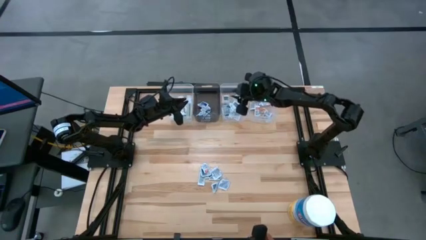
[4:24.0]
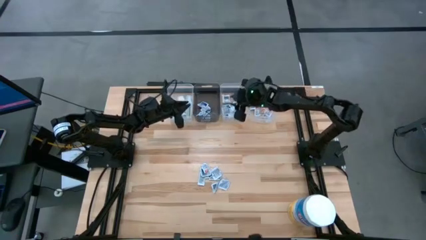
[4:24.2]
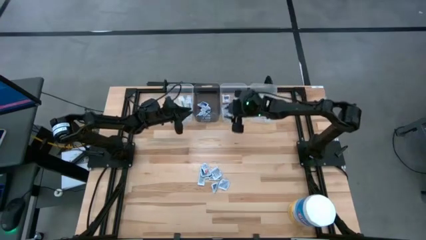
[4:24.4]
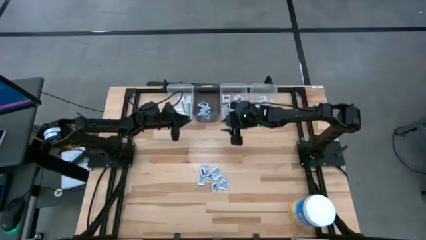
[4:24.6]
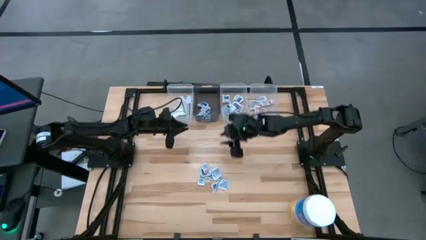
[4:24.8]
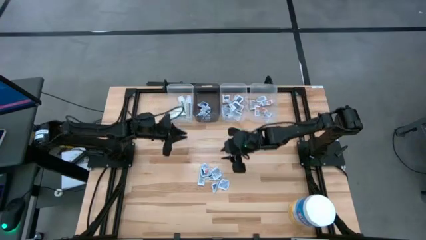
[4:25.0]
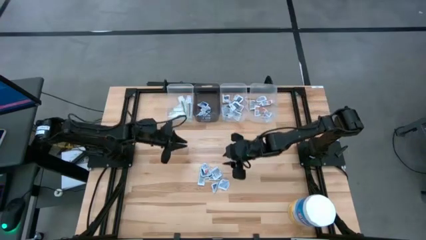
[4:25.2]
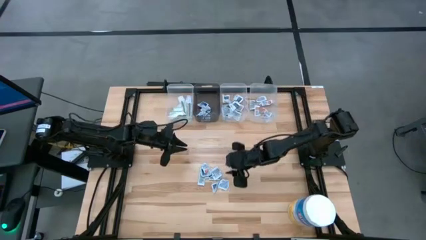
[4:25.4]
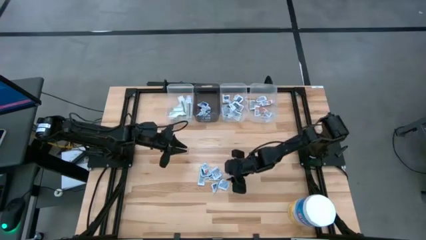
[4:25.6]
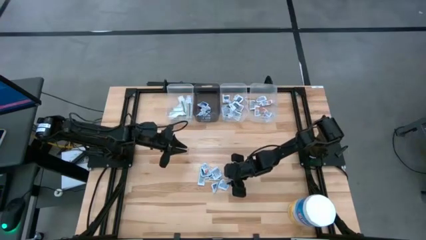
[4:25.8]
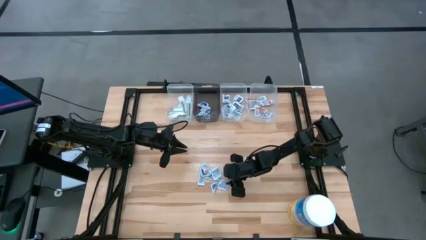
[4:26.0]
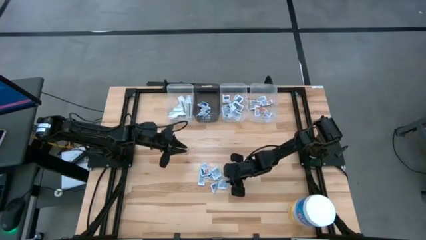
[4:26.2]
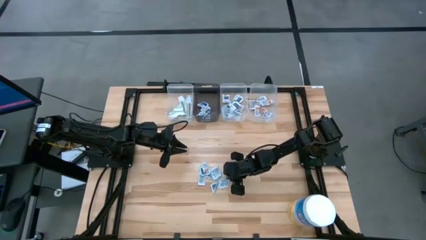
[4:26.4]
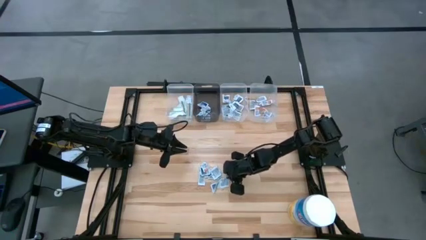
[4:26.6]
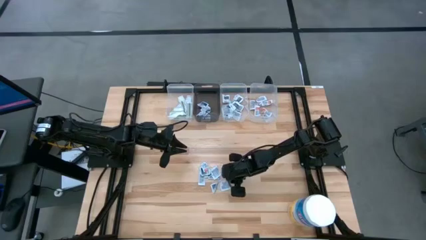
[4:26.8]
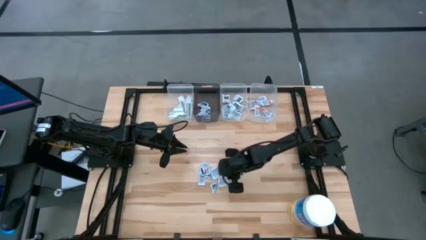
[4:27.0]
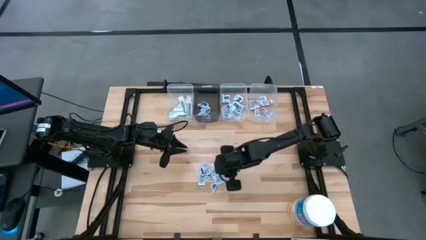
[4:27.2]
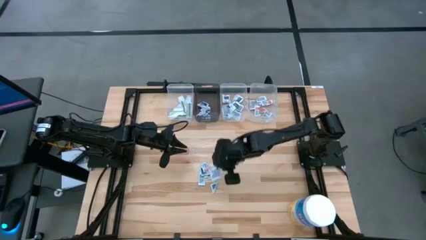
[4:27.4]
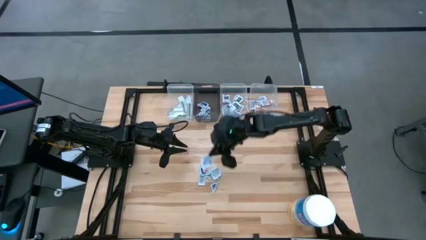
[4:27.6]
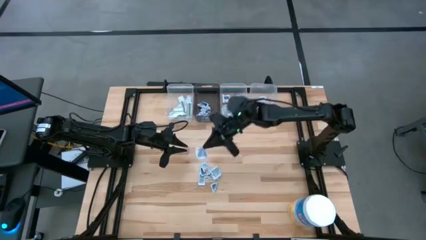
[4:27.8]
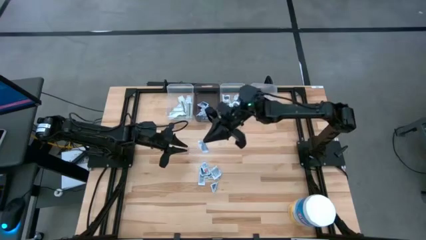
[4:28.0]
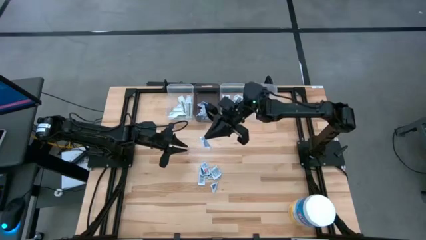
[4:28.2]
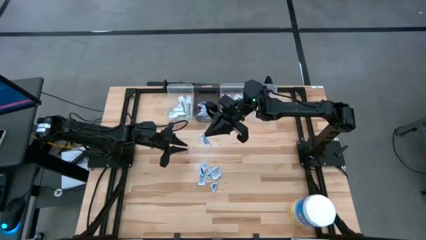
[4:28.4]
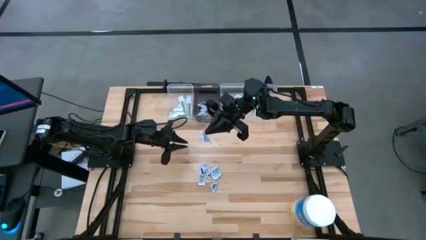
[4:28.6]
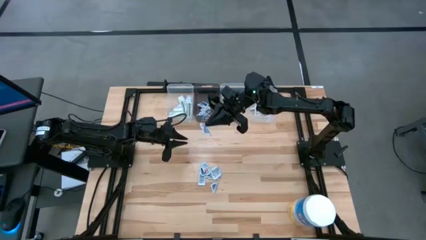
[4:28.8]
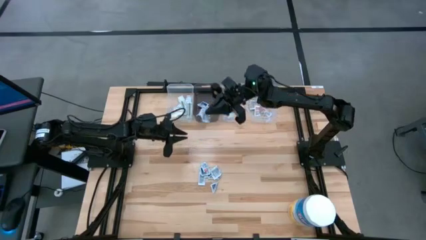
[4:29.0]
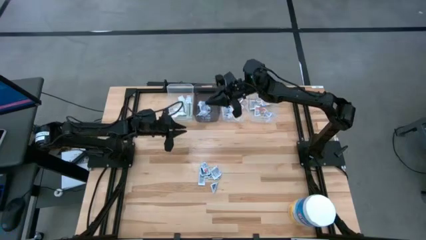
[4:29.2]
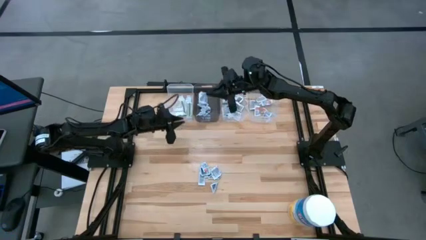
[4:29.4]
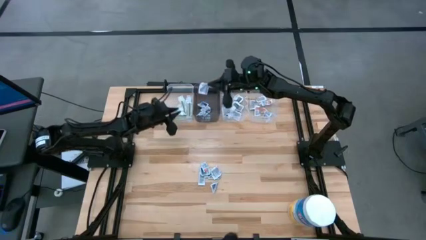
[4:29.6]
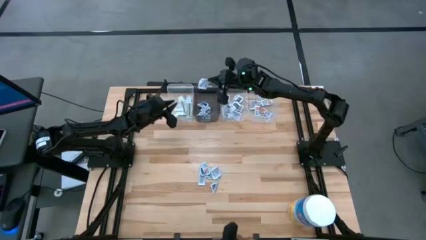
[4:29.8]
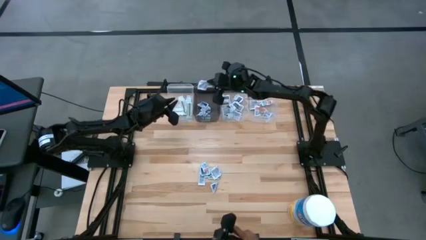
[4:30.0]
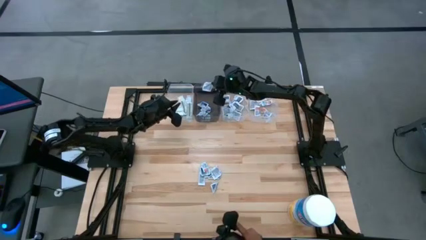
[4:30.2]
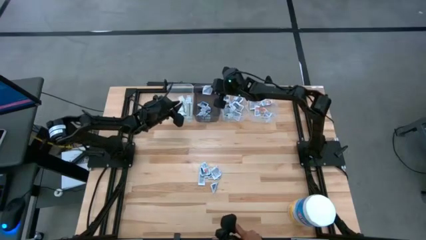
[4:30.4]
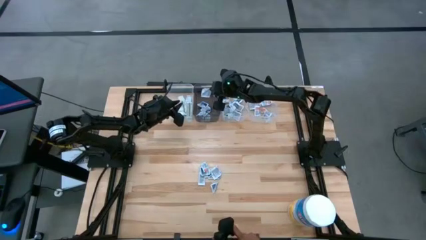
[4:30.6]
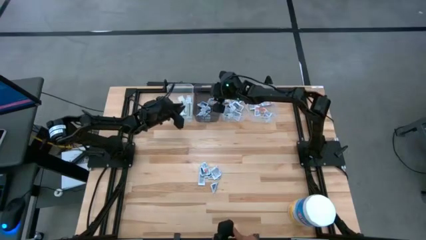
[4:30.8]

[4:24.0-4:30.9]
Task: Pick & Place First Aid Supplies
Put the alcohol pad into the black bin

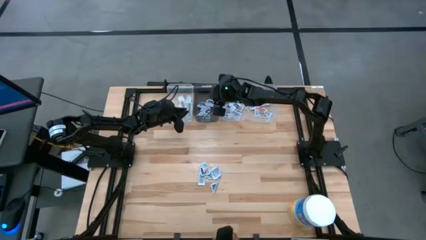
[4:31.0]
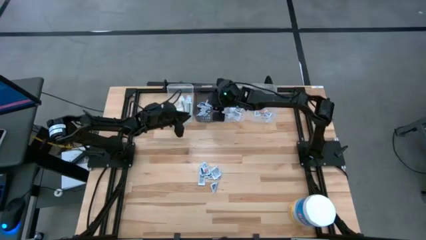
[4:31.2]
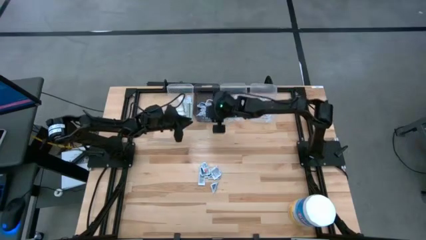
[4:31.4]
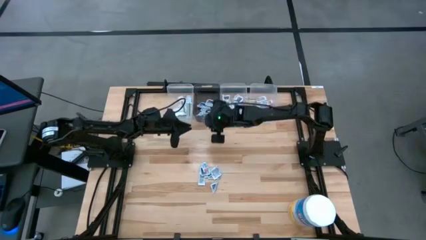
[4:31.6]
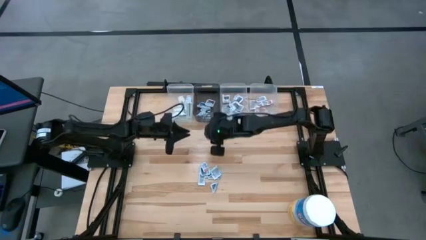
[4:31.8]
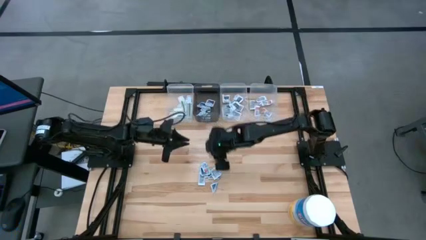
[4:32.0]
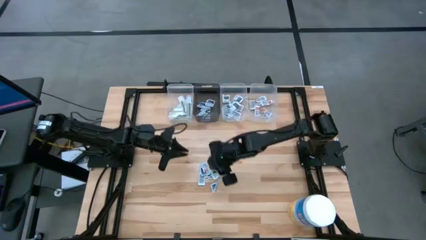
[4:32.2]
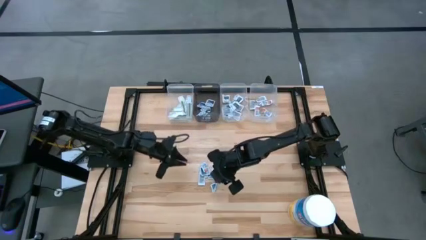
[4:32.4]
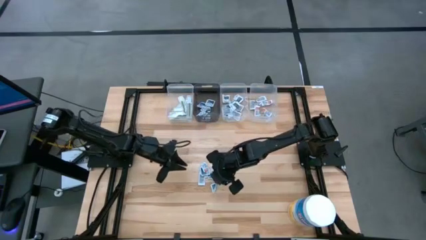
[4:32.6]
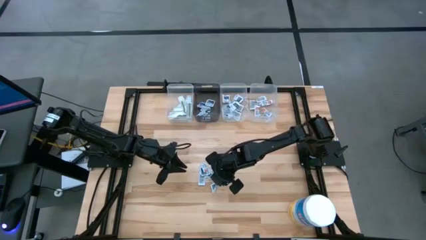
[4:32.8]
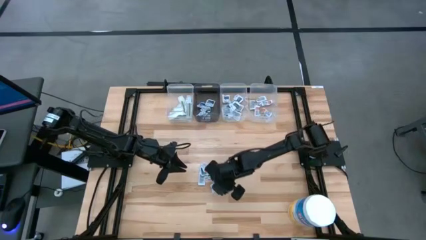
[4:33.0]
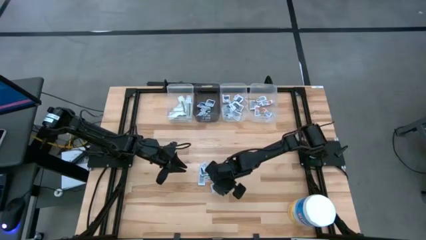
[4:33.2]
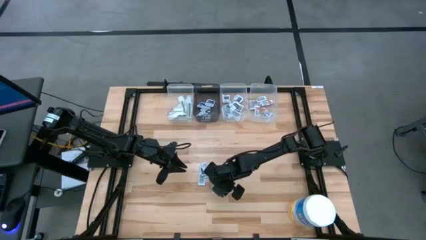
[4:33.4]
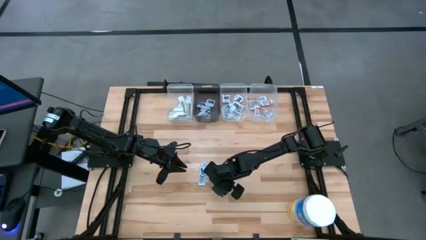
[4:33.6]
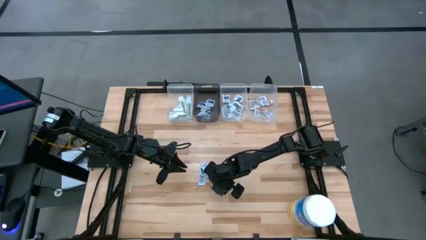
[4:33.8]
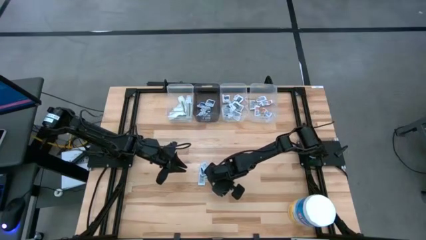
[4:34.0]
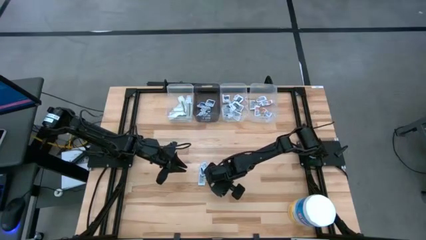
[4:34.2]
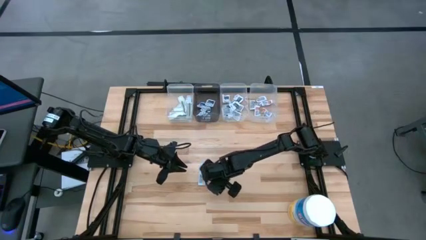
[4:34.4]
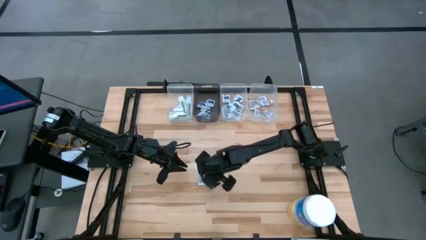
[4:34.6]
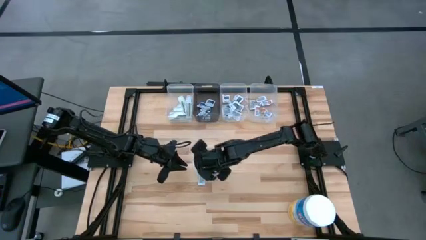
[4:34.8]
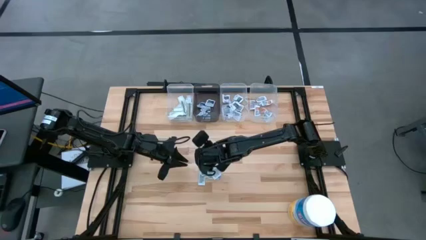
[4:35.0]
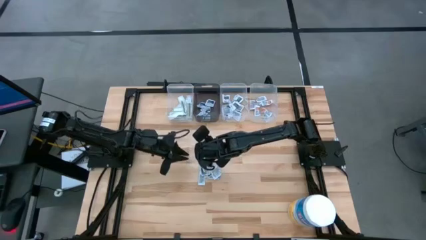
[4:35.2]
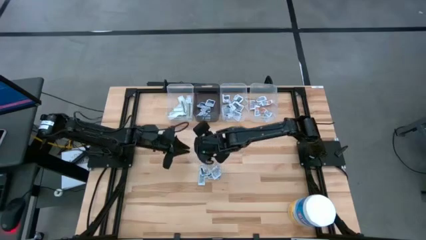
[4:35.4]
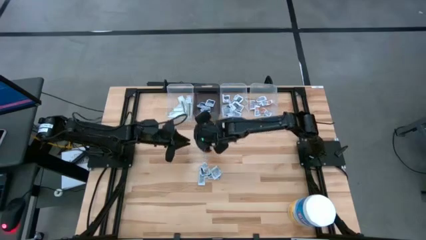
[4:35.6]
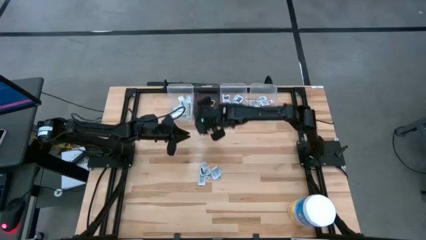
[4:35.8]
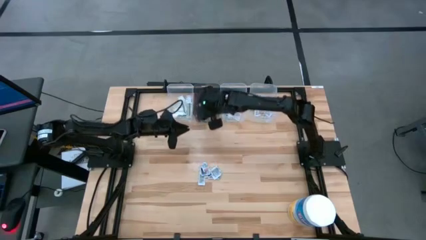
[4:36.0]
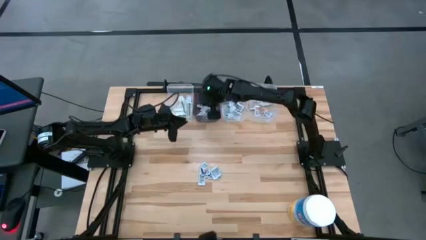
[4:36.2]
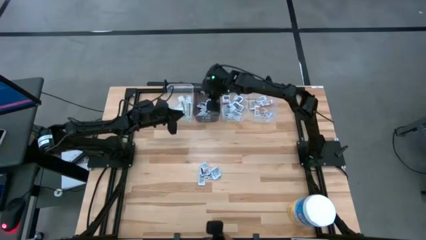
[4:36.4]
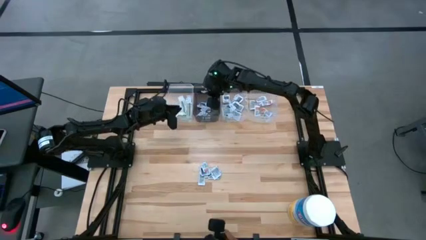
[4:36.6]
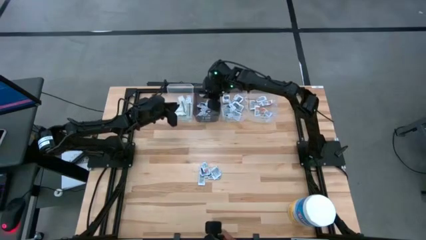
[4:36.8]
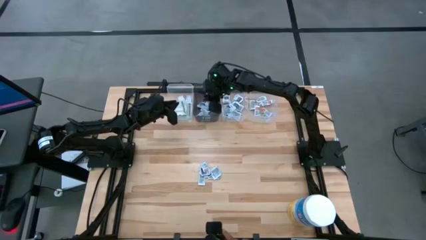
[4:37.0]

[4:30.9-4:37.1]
Put the alcohol pad into the black bin

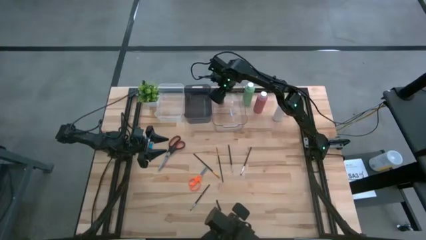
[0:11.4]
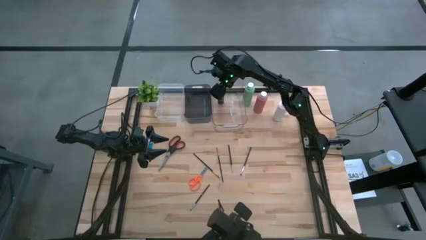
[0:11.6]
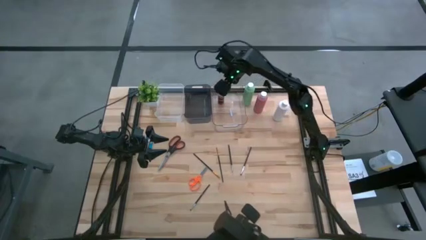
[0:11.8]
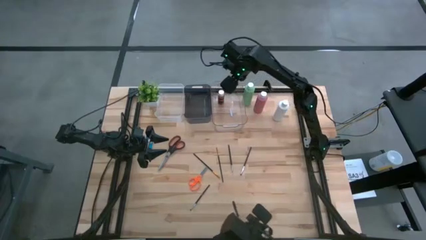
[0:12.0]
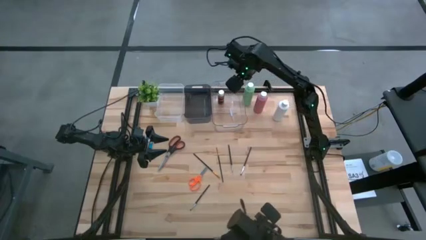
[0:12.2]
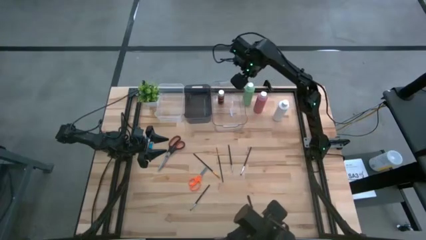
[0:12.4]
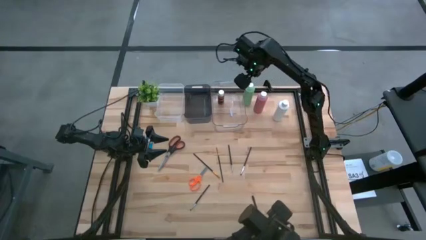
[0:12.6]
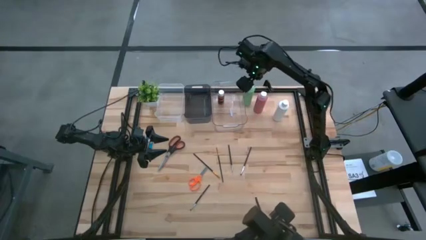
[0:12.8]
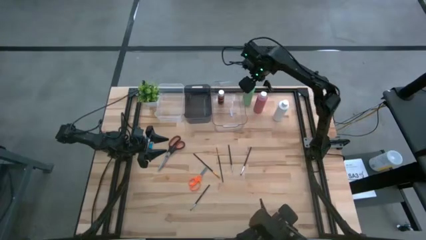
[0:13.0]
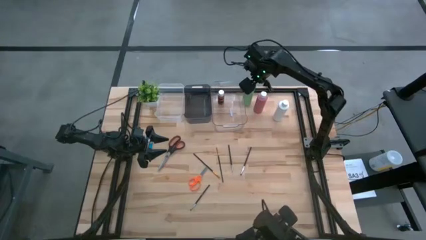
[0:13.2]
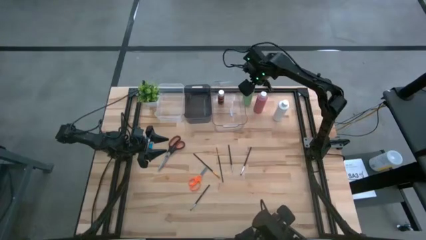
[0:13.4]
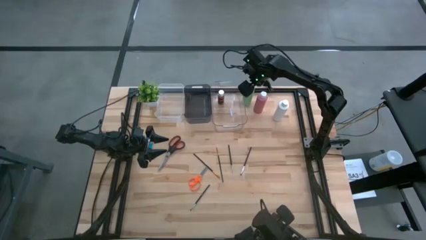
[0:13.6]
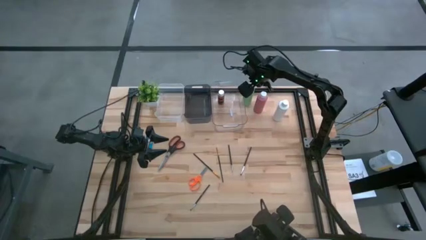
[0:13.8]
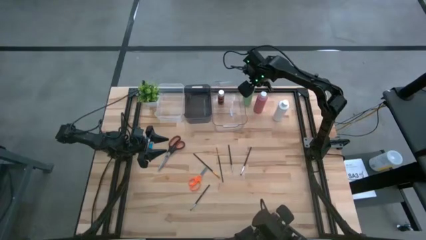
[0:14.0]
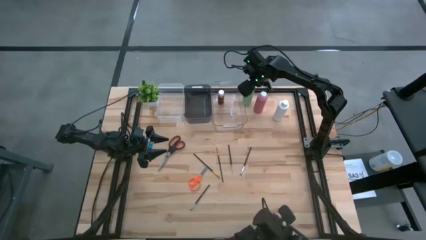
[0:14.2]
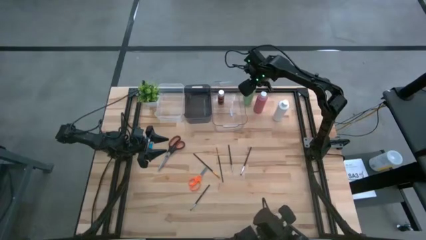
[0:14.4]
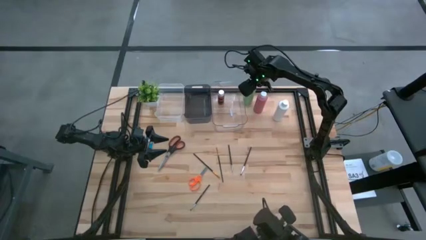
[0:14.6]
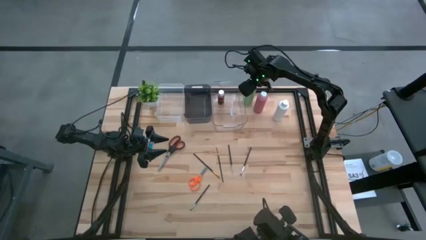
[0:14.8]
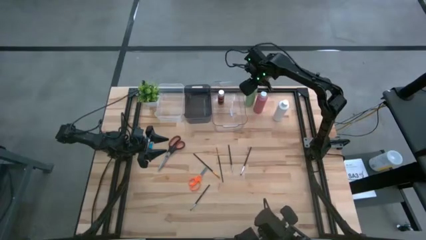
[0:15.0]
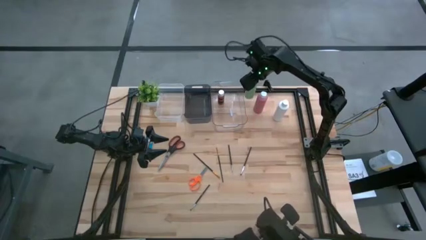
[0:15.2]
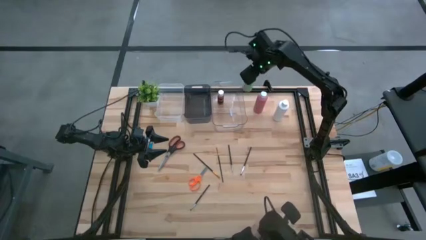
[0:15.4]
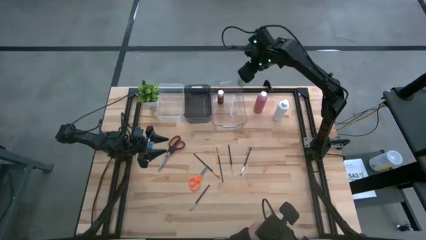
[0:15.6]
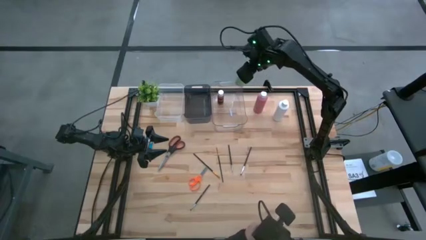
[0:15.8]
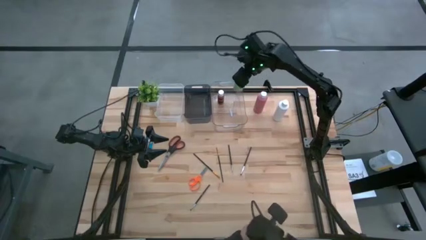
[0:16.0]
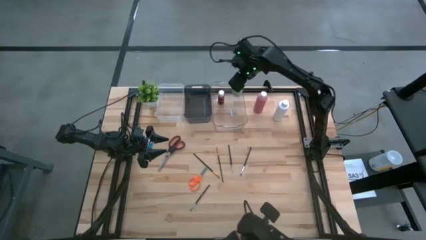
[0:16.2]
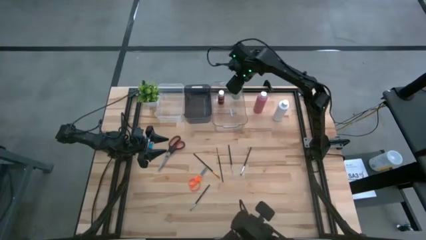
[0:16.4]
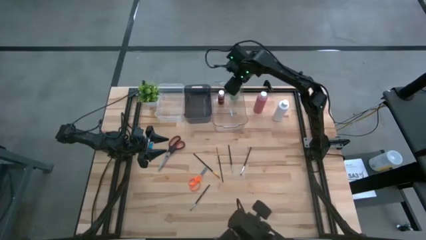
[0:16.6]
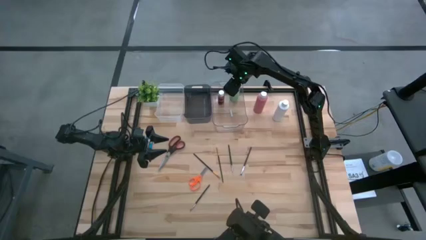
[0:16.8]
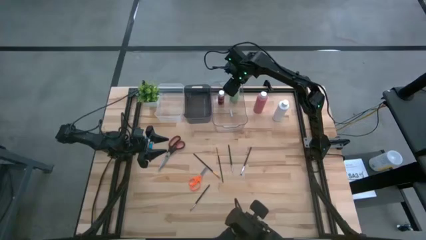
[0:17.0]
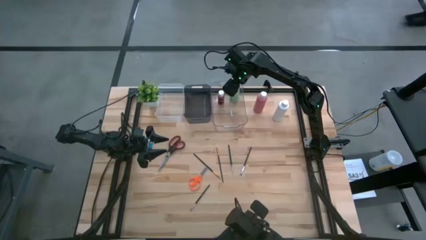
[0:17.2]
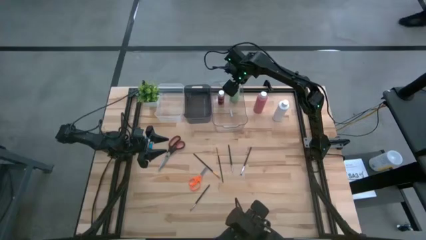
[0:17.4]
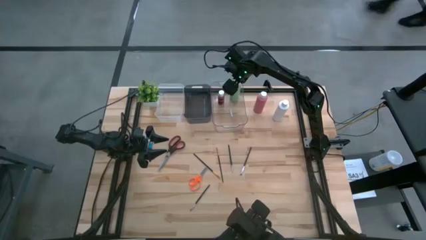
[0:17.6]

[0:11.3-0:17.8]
Task: Pick & Place Paint Supplies
Put the green paint bottle into the right transparent bin
